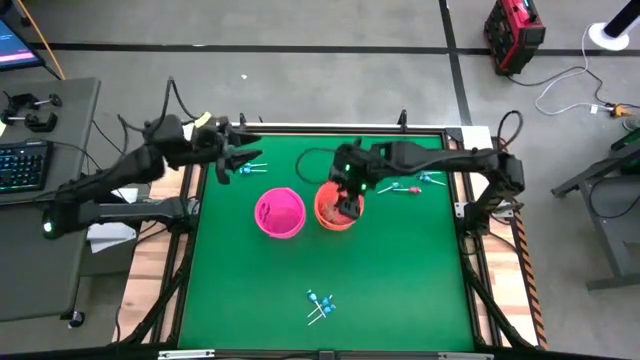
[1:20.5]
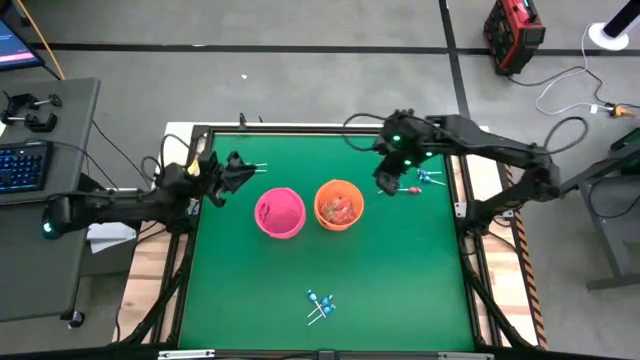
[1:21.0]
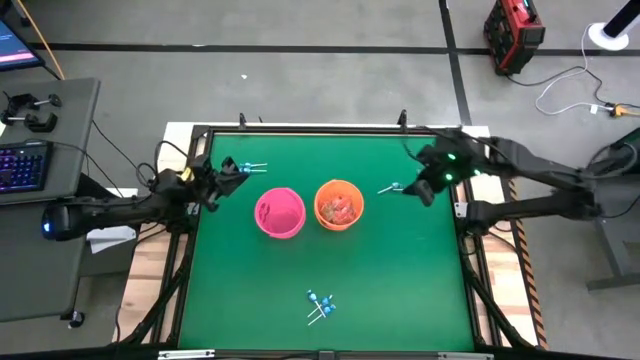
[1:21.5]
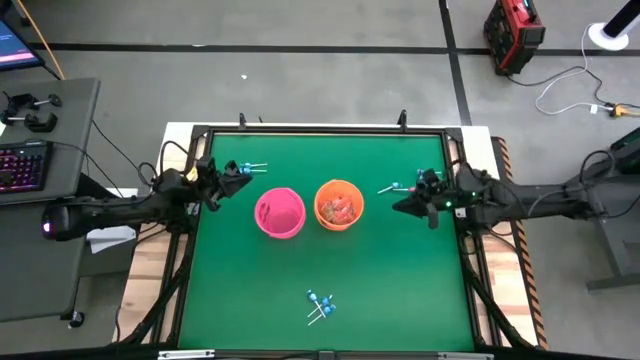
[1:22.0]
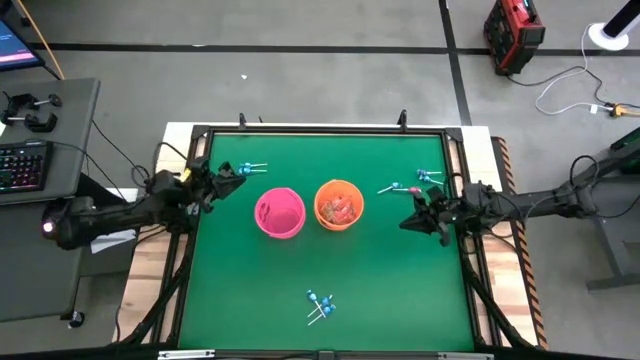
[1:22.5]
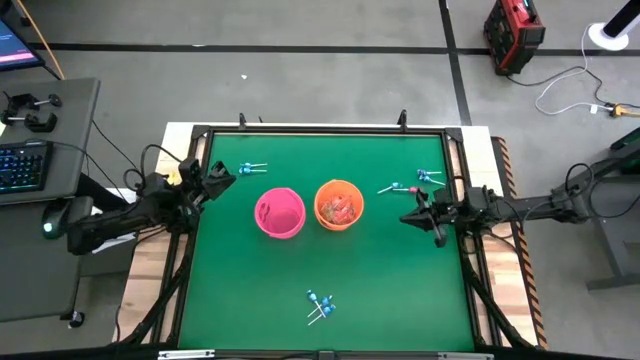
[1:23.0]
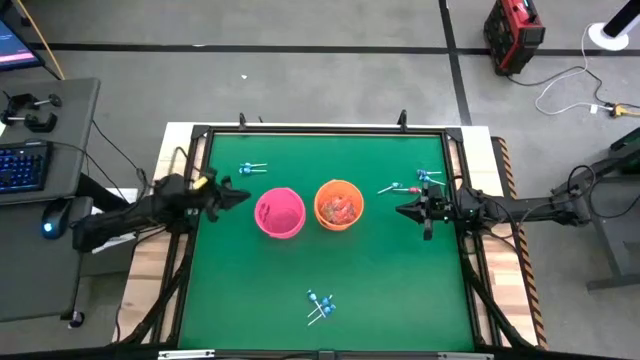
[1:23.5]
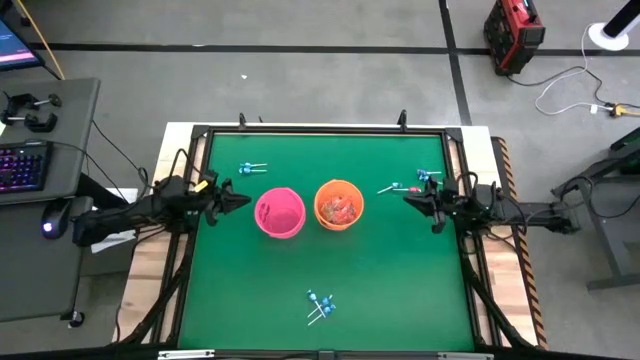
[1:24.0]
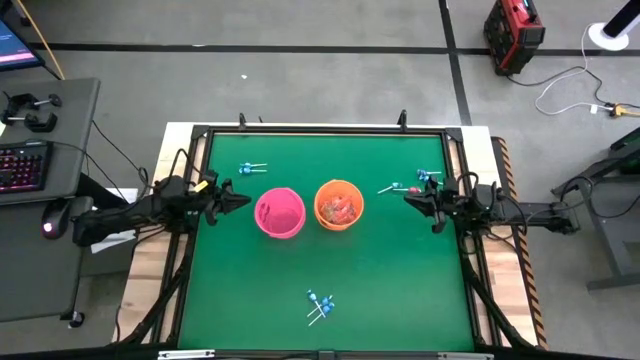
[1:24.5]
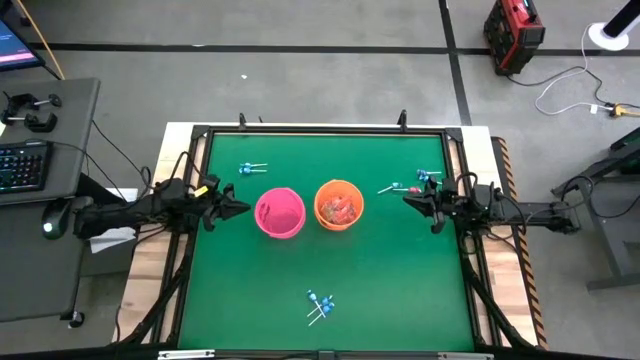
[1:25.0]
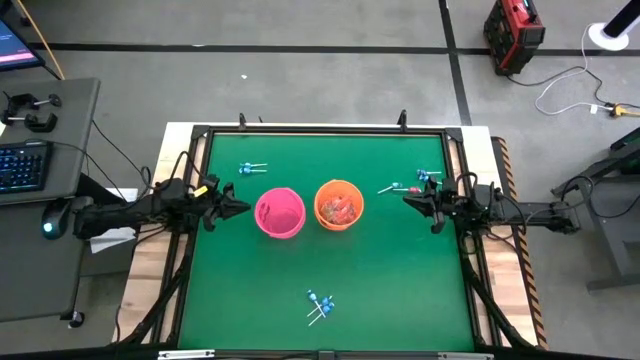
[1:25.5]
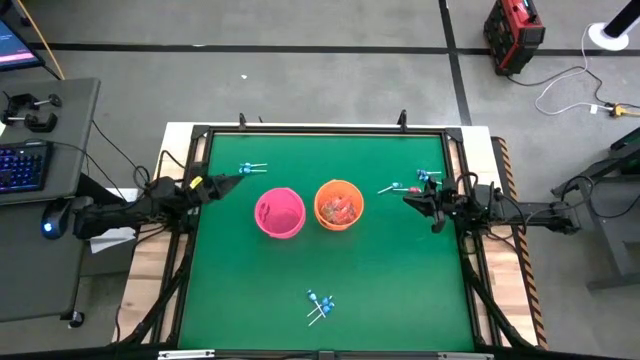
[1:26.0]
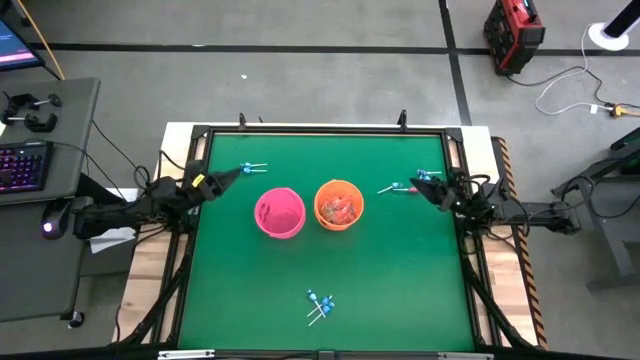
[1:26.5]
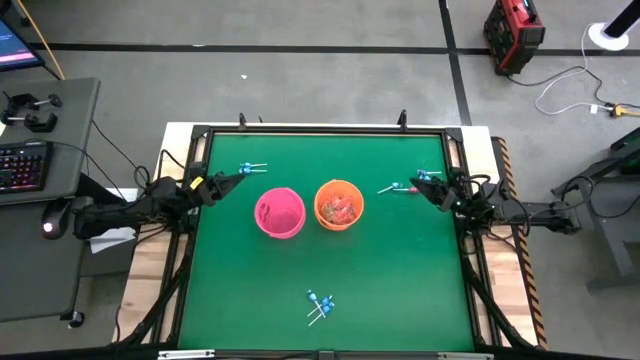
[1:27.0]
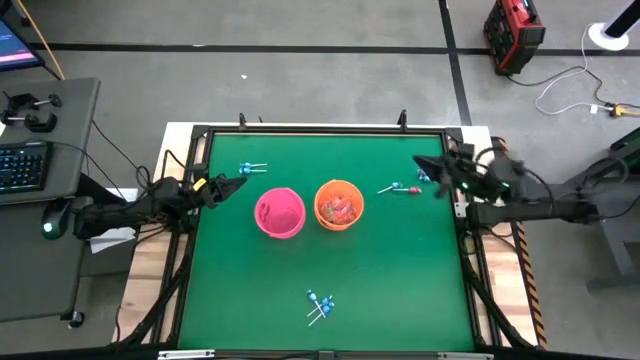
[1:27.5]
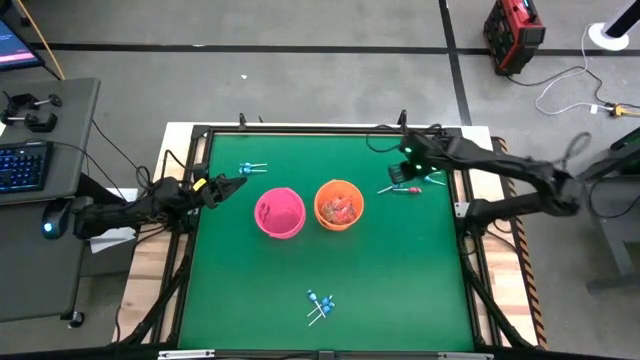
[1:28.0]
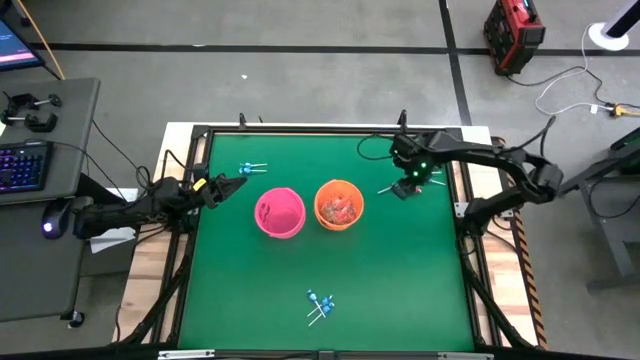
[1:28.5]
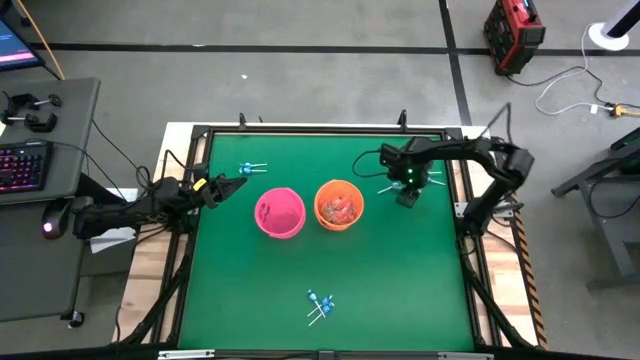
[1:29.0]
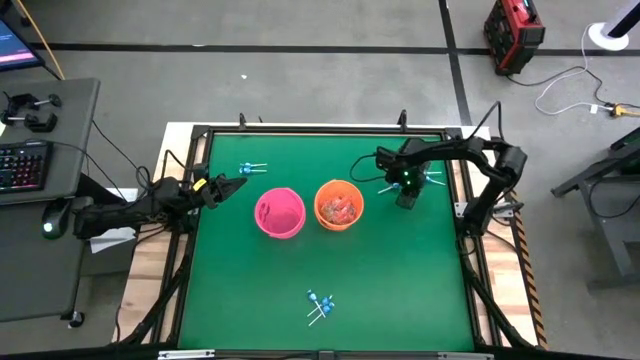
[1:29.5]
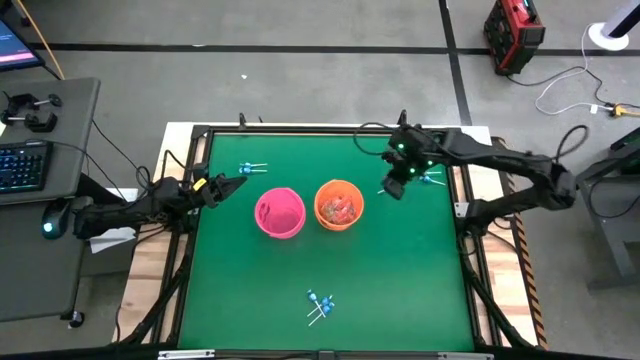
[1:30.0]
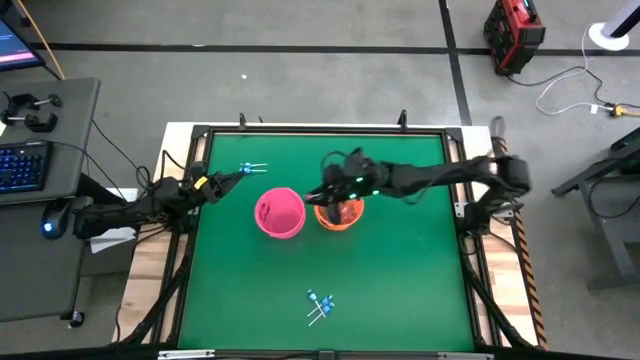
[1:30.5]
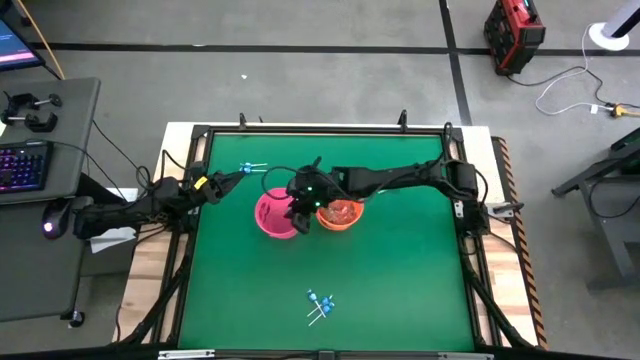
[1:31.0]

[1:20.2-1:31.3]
Task: Sort candy by brand, put in halloween buckets
Put the pink lollipop into the pink bucket

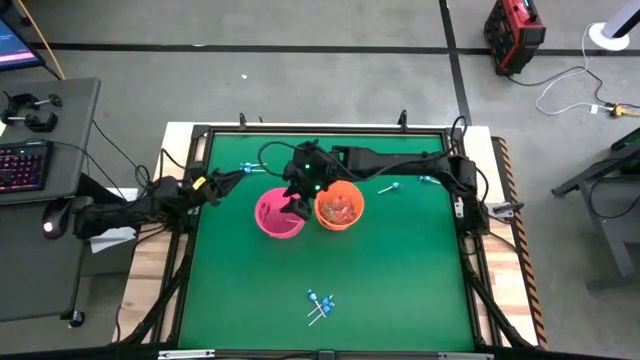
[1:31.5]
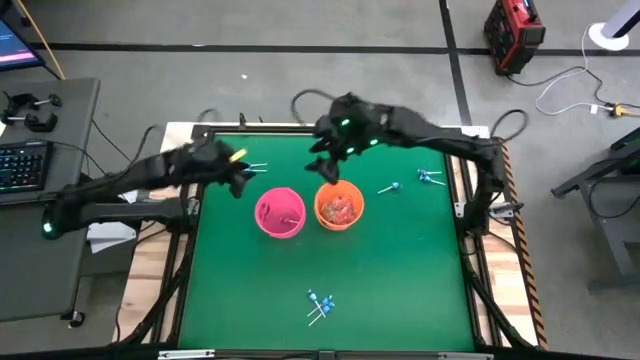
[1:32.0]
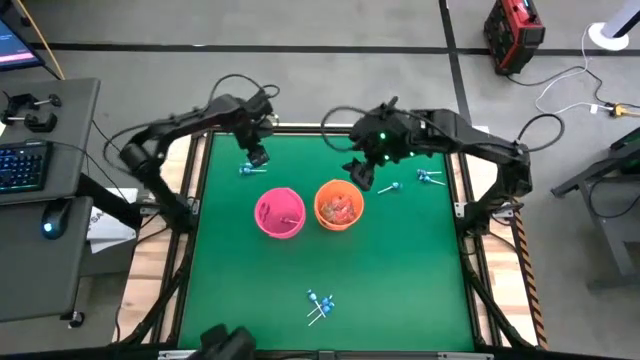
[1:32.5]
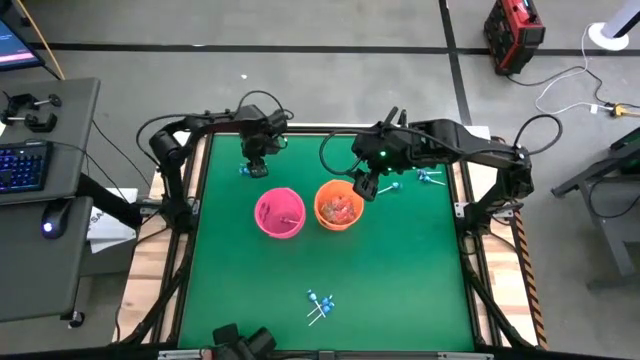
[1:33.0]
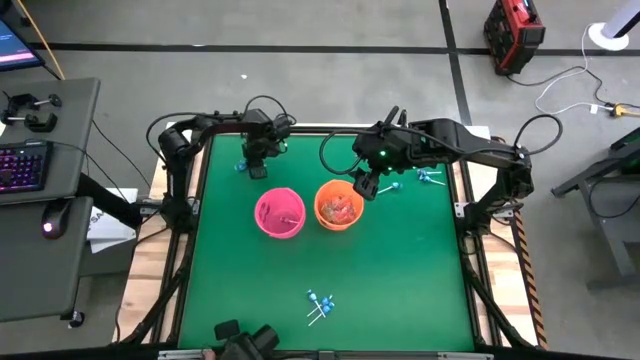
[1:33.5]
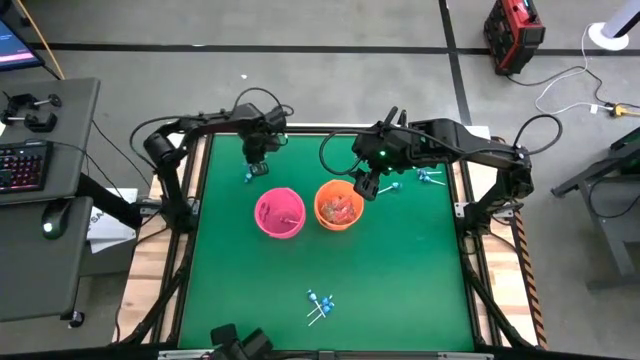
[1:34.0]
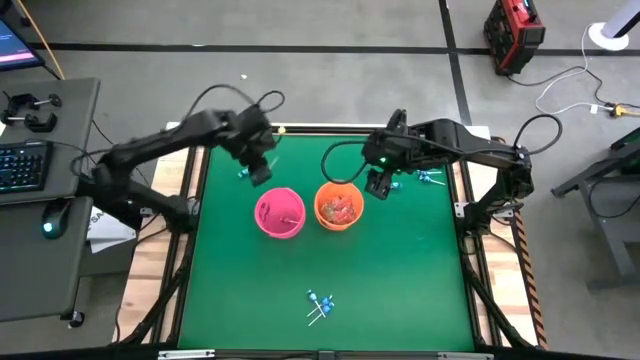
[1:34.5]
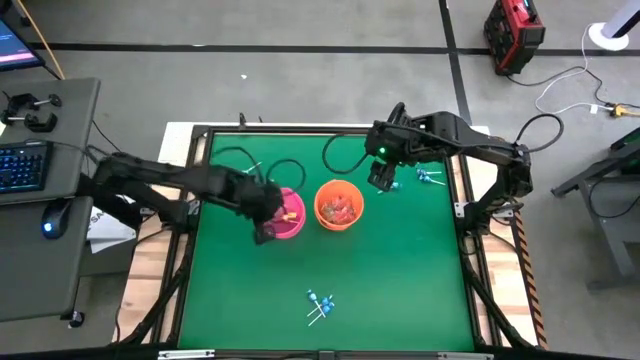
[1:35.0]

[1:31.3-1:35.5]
Put the blue lollipop into the pink bucket

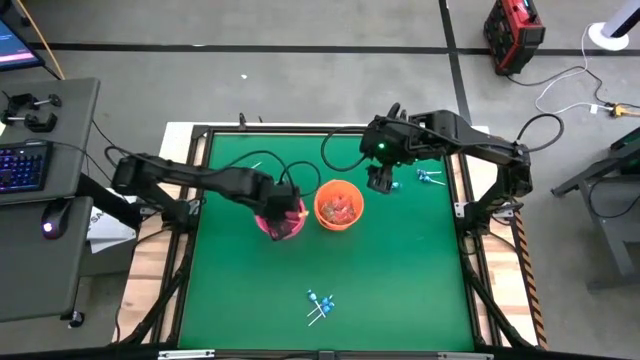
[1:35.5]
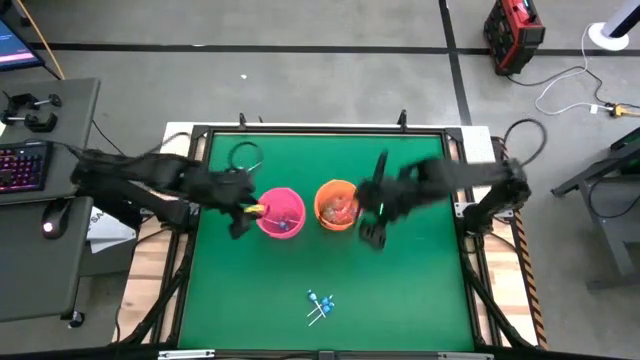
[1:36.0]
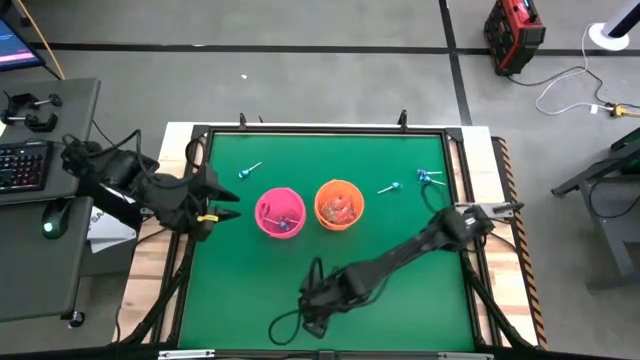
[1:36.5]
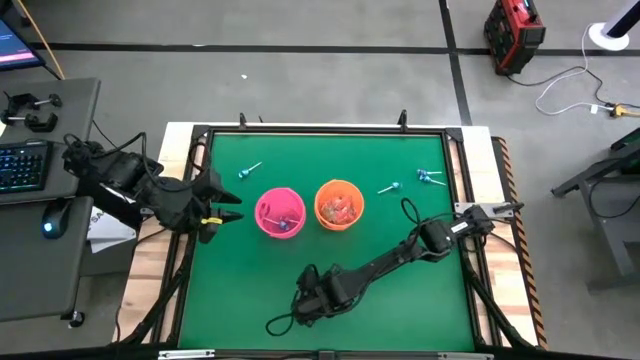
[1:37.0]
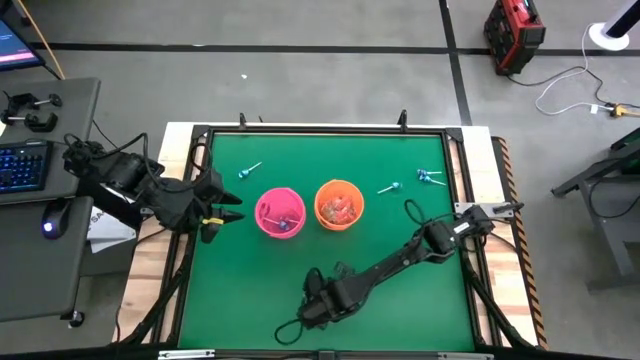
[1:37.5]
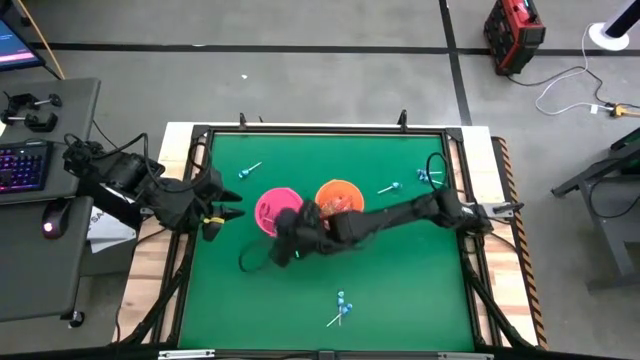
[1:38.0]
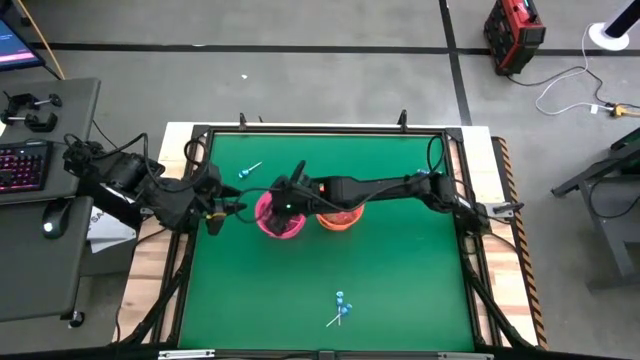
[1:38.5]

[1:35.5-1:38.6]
Put the blue lollipop into the pink bucket

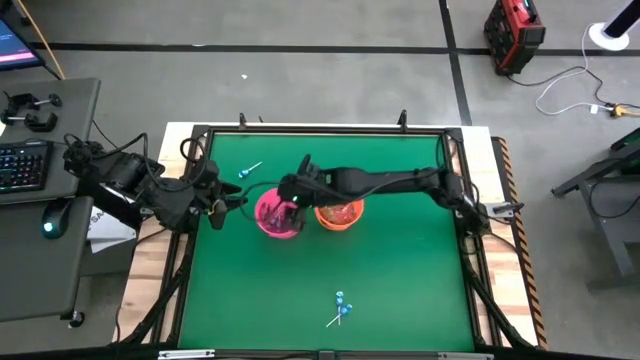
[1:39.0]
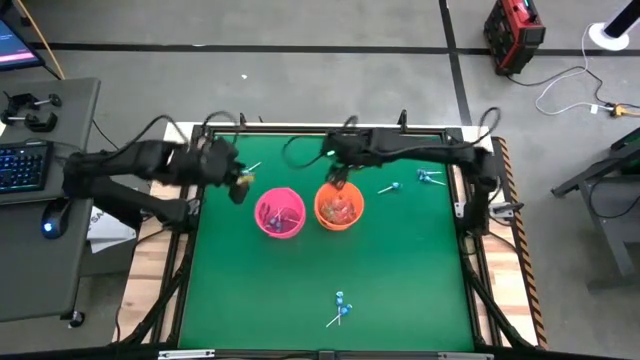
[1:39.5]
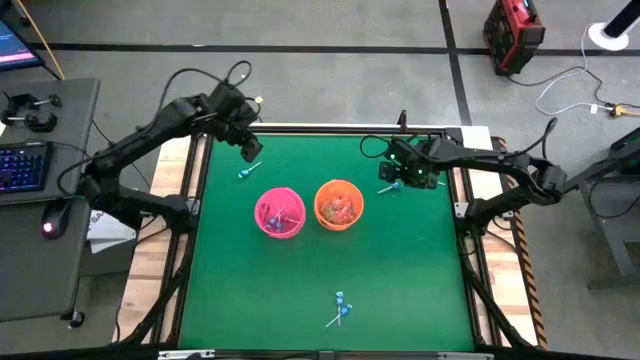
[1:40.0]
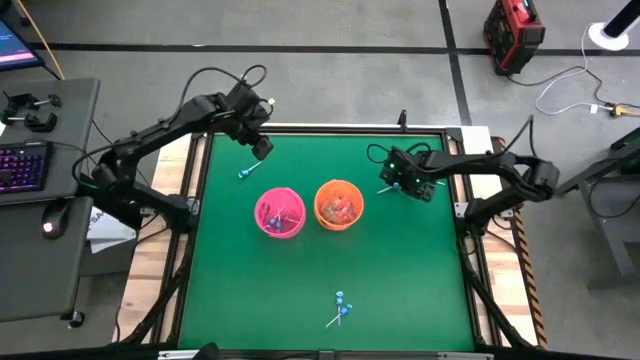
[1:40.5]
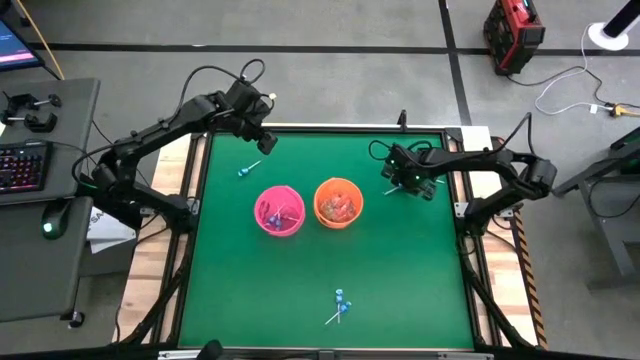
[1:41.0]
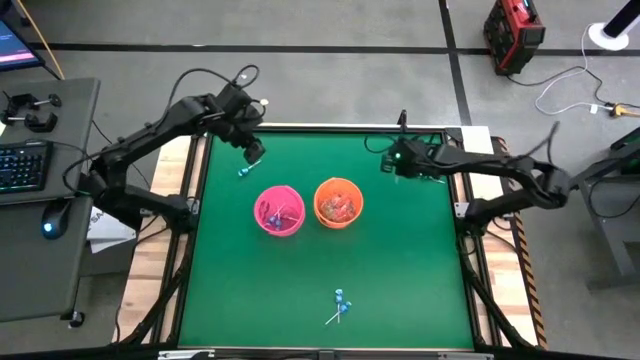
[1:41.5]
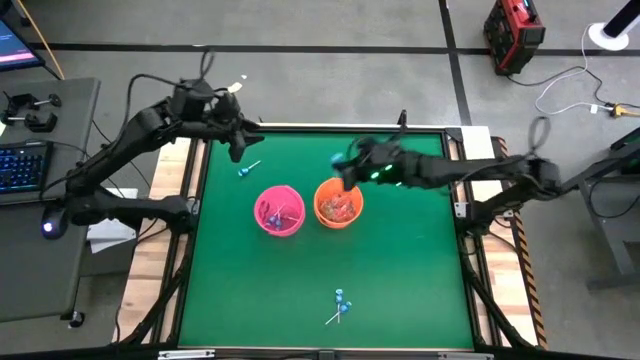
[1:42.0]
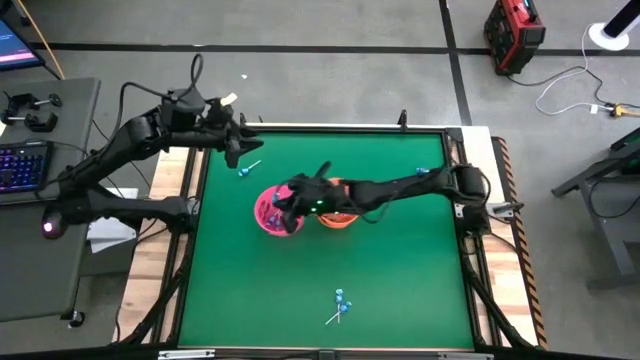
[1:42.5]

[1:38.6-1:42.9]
Put the blue lollipop into the pink bucket
